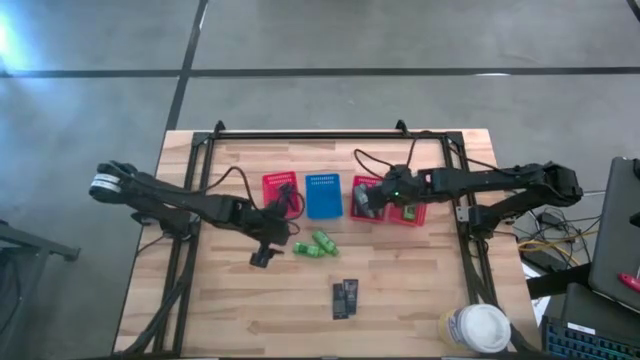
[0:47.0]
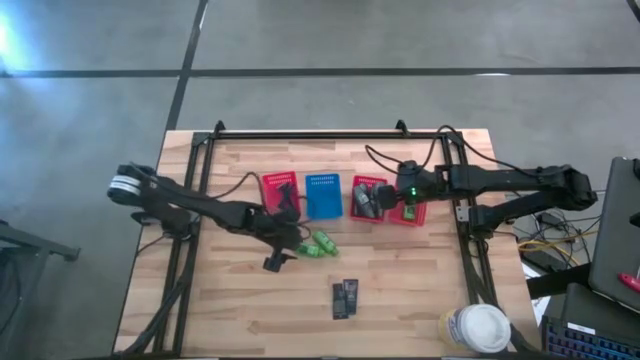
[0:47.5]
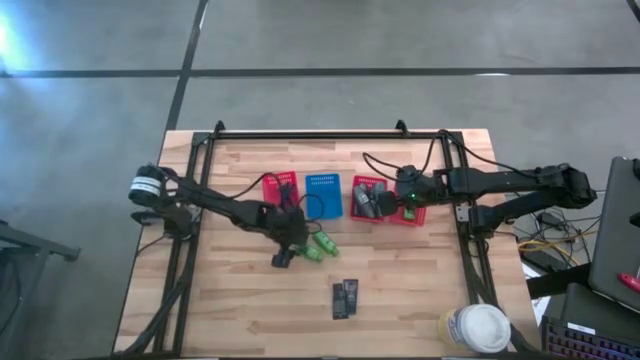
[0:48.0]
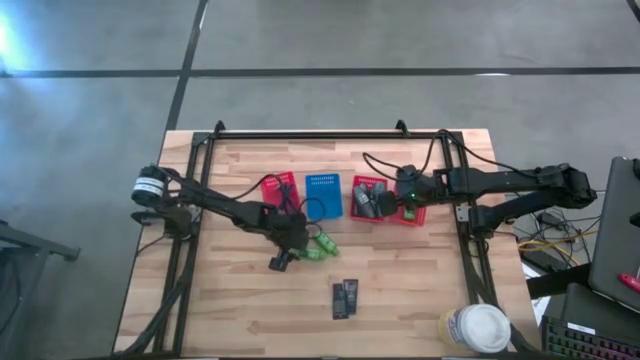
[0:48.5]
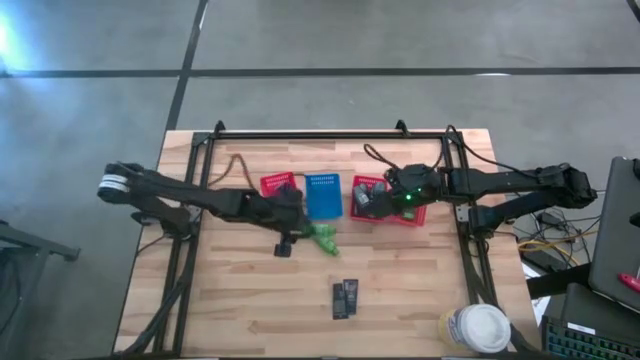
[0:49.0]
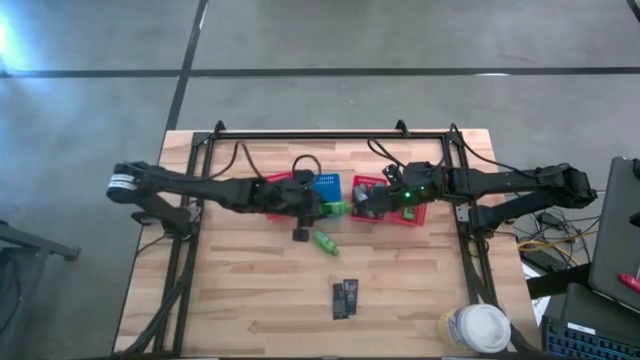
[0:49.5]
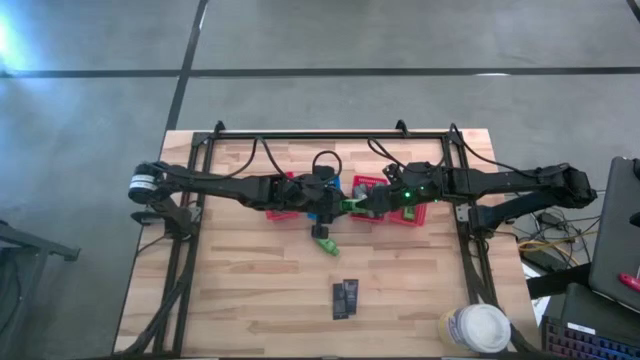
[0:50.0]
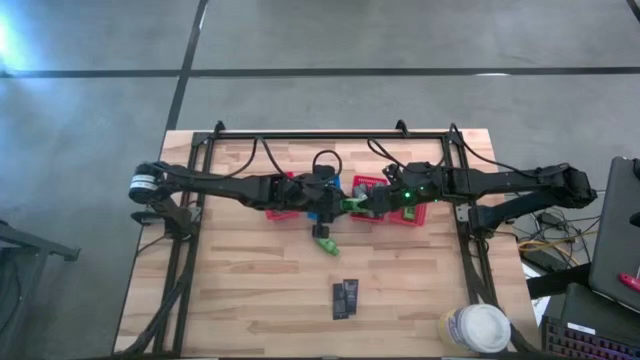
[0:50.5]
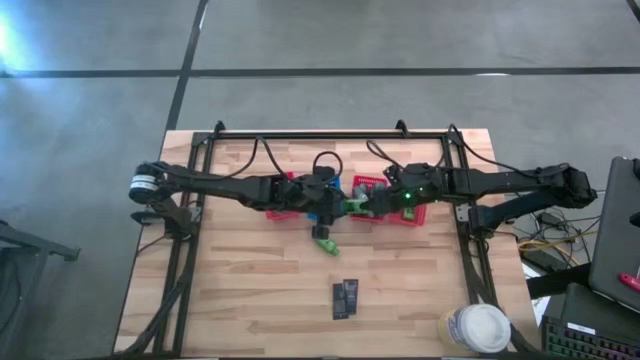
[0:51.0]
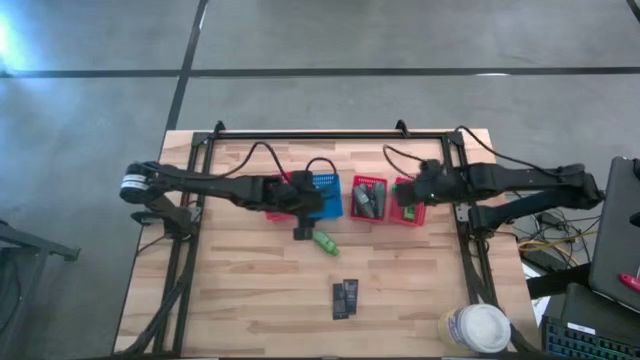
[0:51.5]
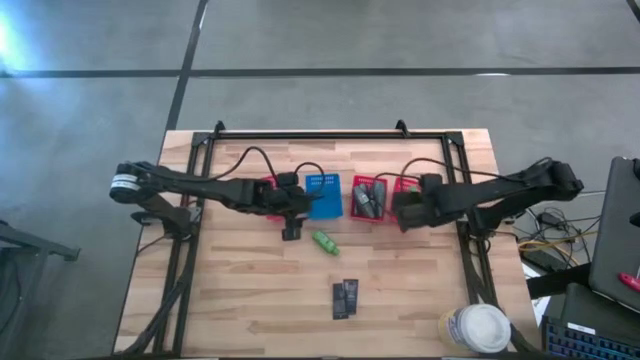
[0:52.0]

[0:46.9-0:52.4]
Task: Pick & Place Travel size toiletries
Put the green shampoo into the right red bin

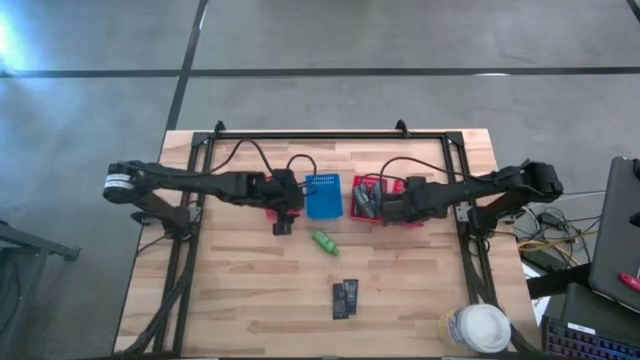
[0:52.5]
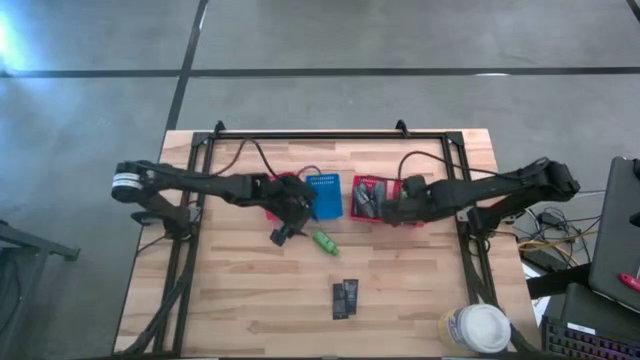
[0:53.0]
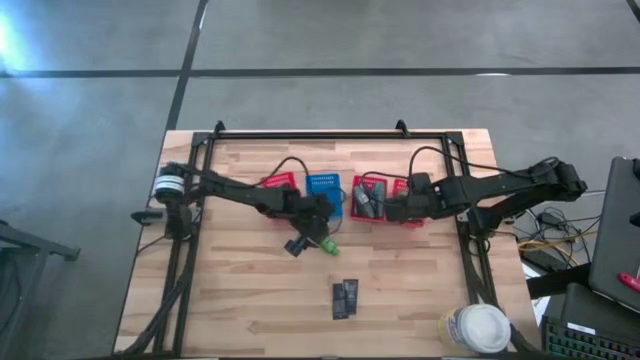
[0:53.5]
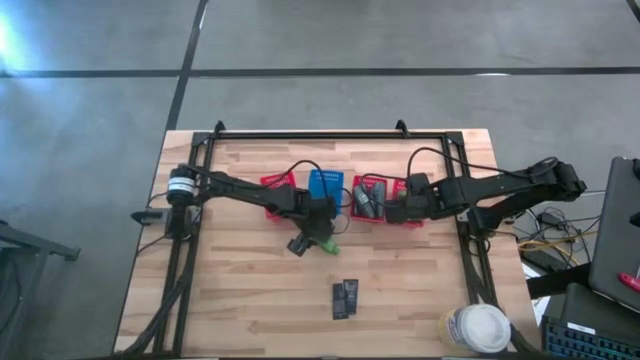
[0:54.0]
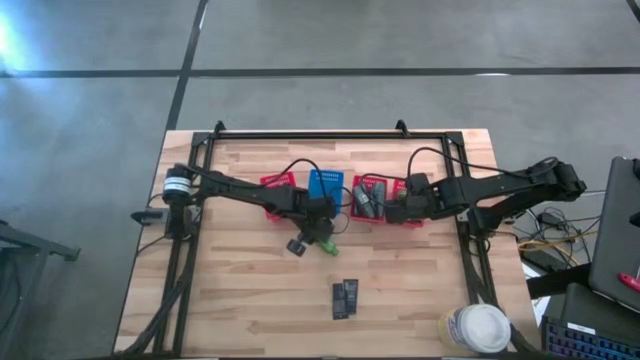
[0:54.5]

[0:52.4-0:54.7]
Put the green shampoo into the right red bin

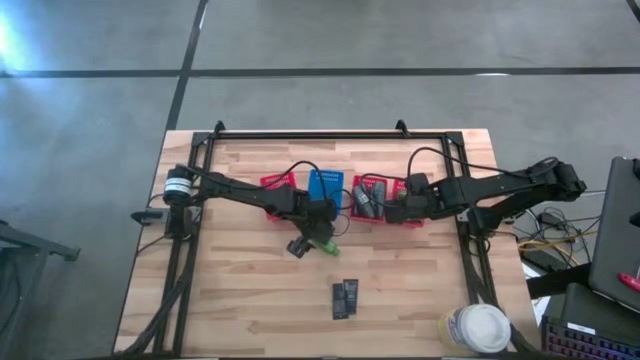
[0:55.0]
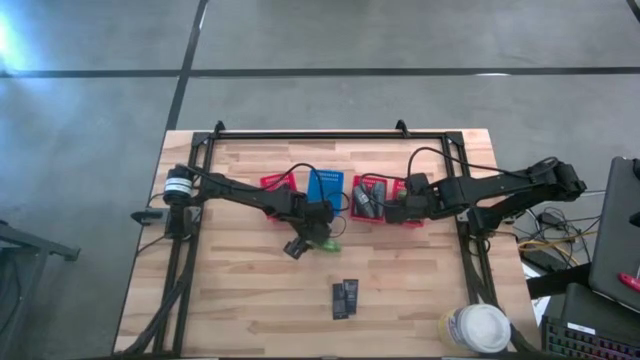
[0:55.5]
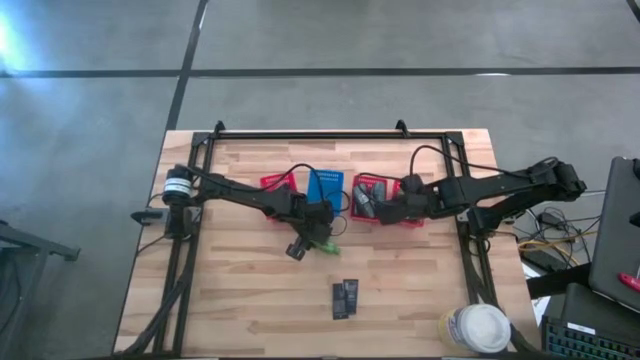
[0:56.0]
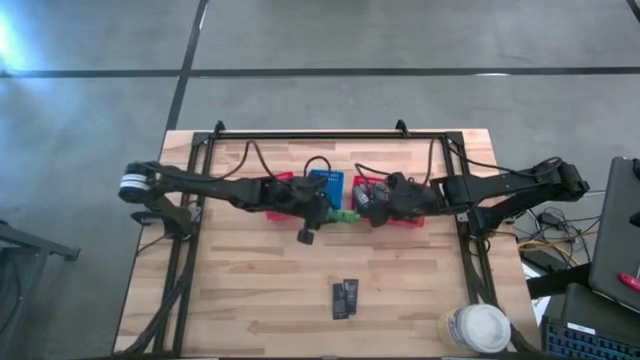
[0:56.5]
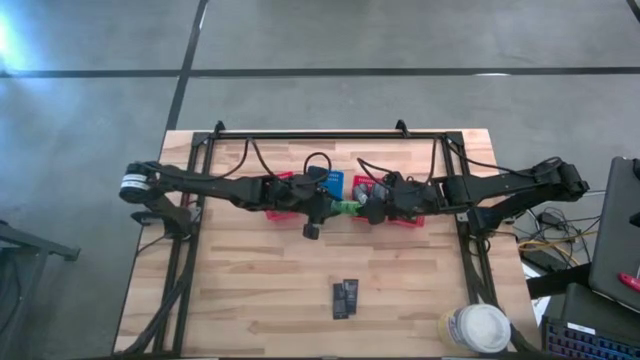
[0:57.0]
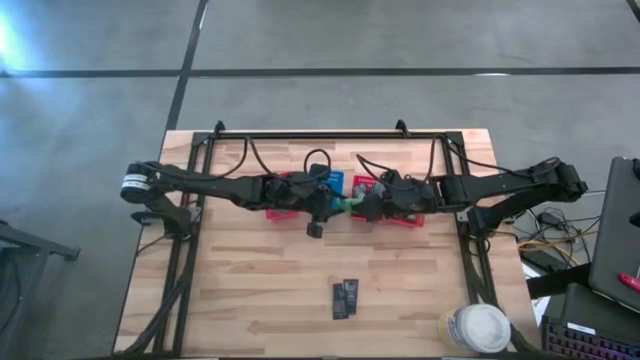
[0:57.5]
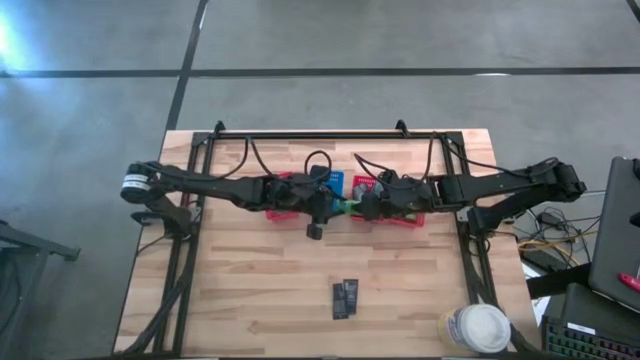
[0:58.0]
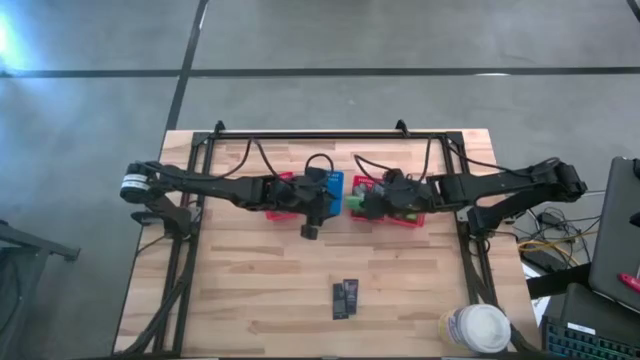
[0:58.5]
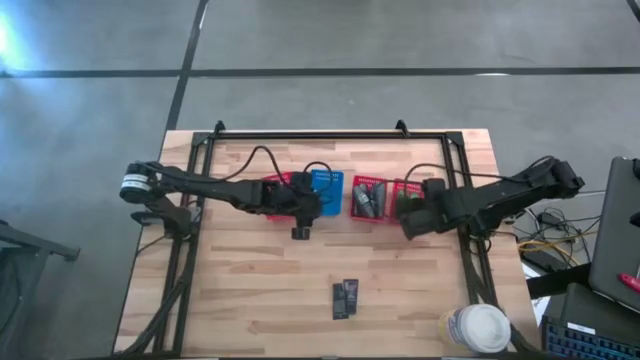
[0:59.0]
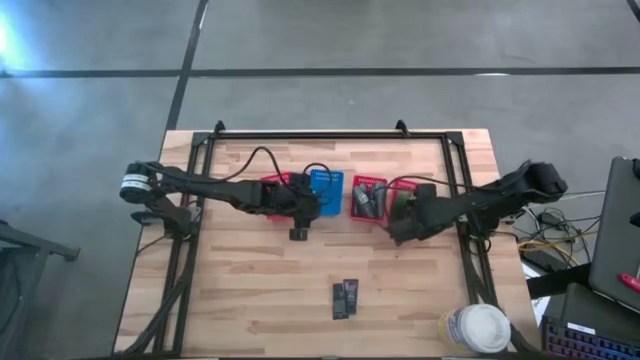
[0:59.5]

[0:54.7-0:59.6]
Put the green shampoo into the right red bin

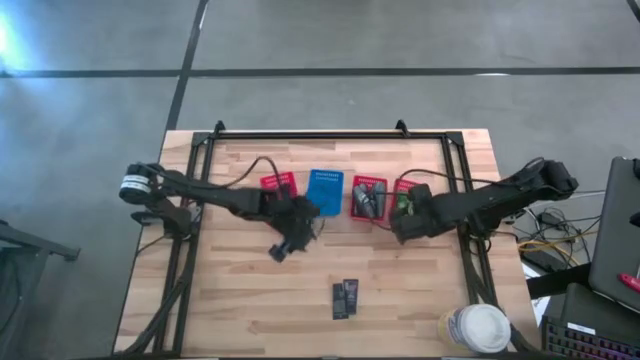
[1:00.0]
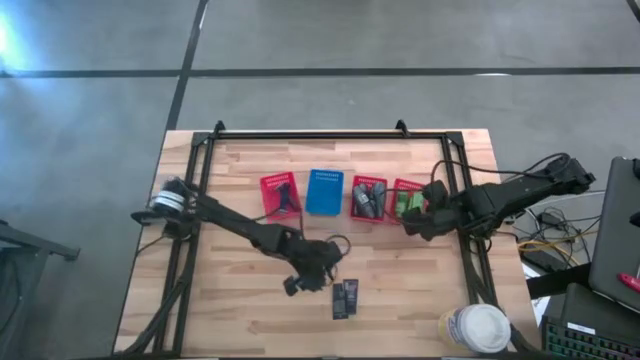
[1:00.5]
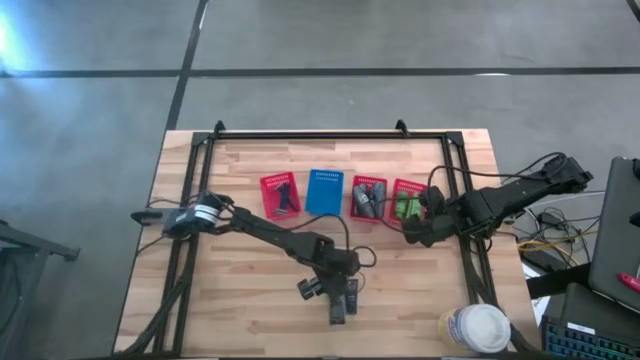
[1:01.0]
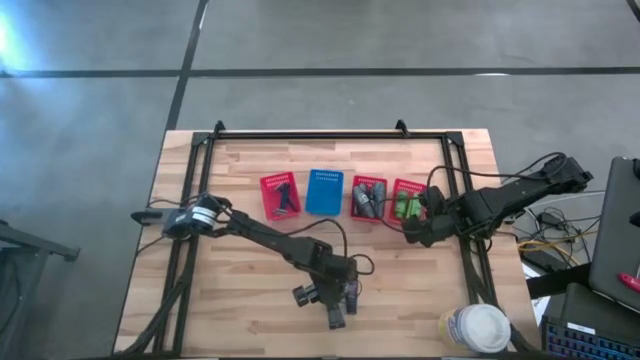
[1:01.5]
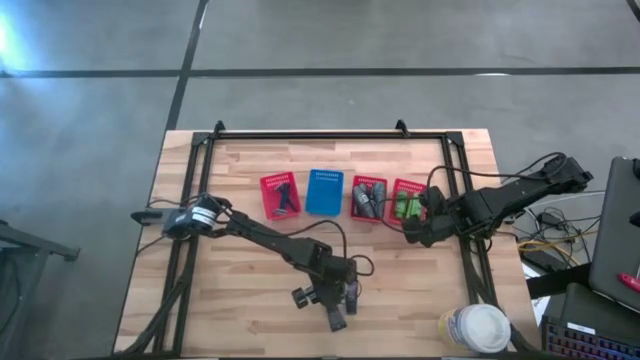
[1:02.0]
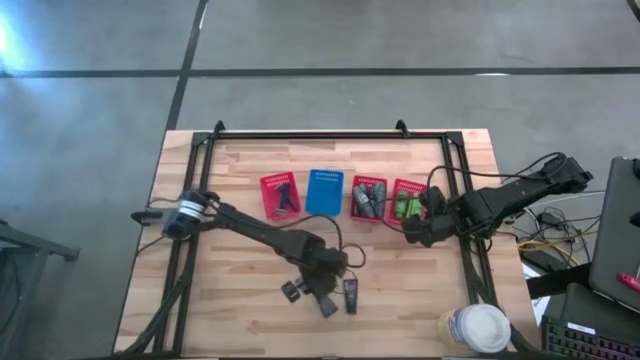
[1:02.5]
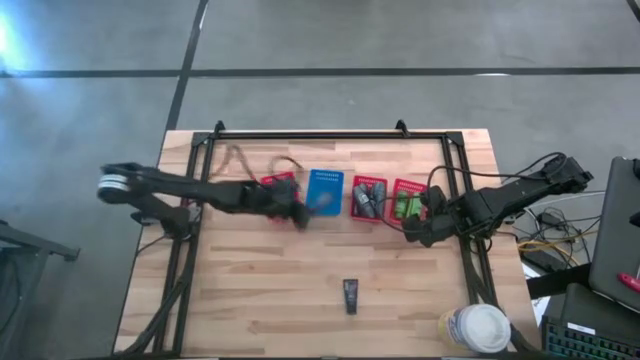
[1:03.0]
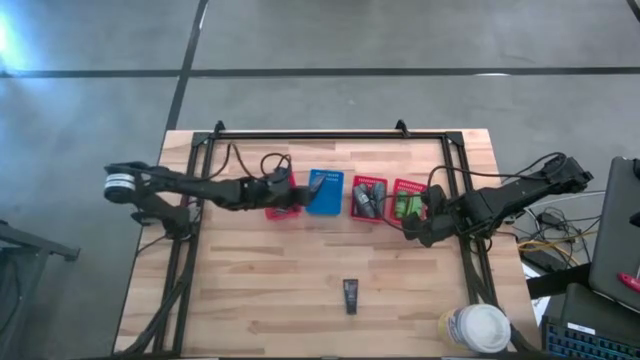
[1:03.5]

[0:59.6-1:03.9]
Put the blue shaving cream into the blue bin

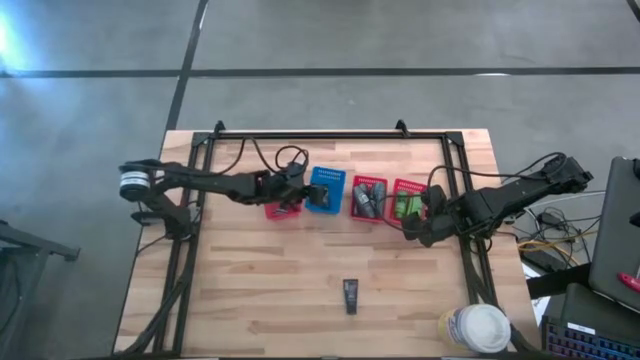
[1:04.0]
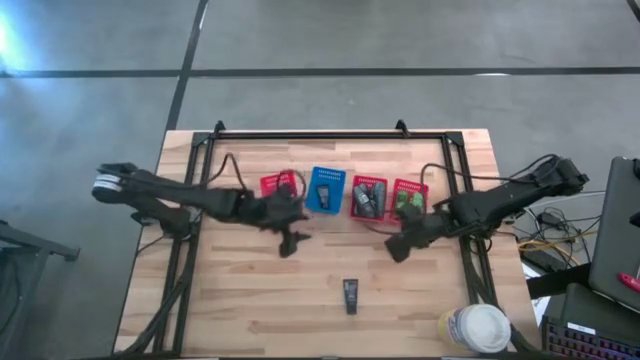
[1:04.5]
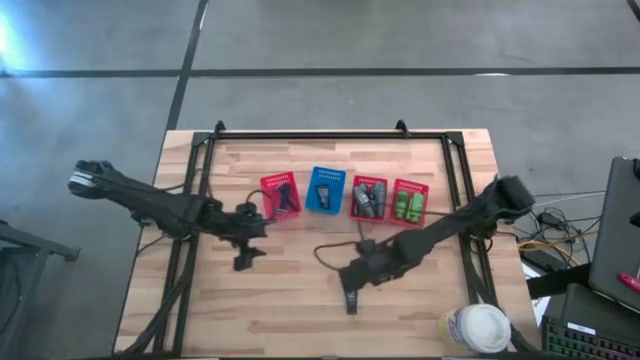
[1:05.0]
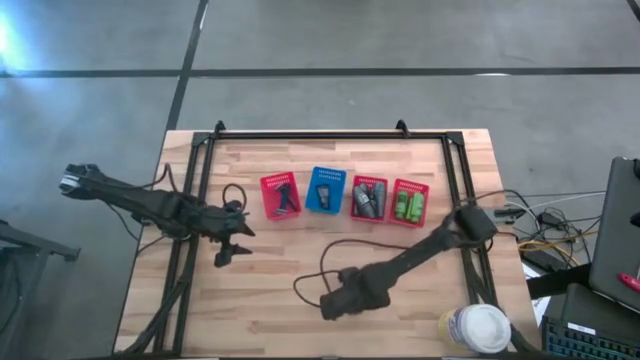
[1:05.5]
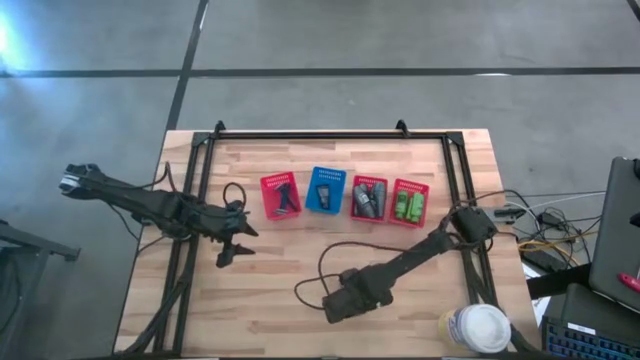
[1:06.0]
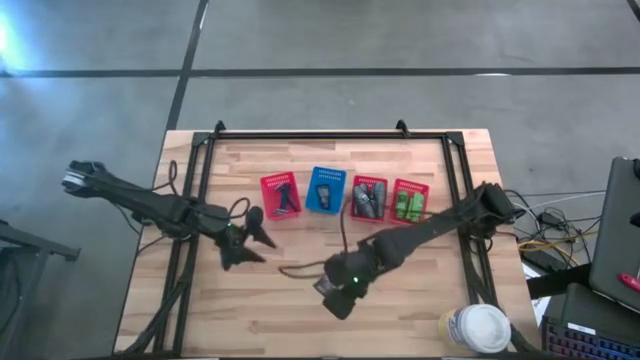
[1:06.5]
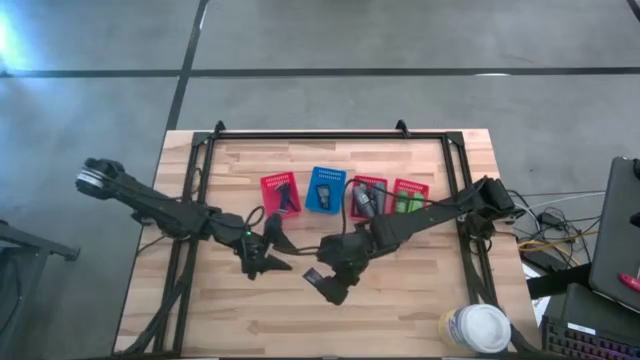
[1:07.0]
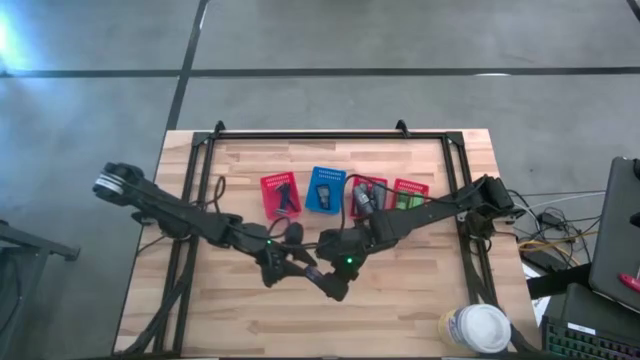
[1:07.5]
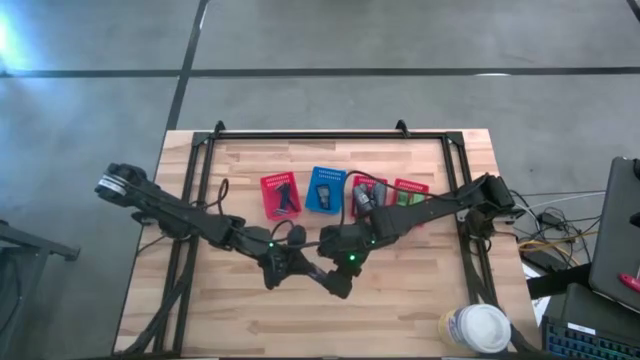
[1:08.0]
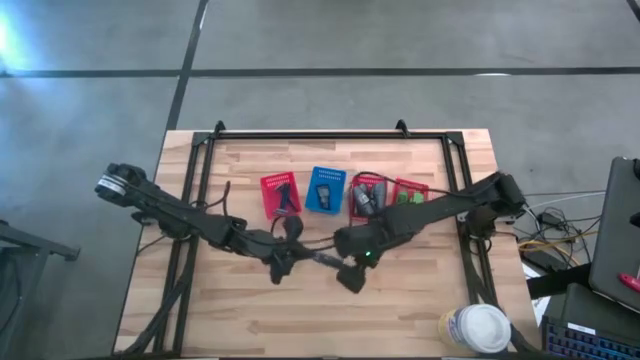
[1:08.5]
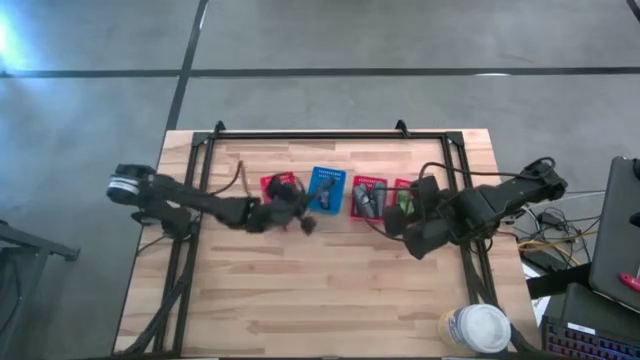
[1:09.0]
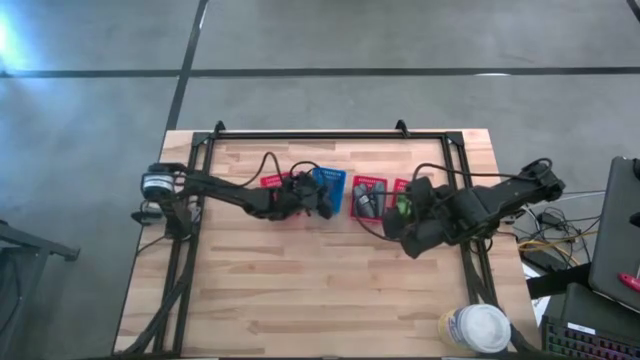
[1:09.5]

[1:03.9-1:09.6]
Put the blue shaving cream into the blue bin
